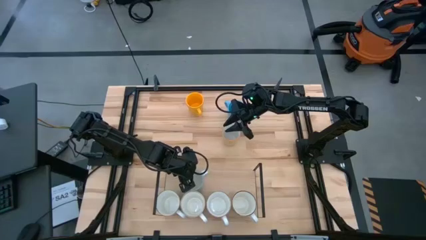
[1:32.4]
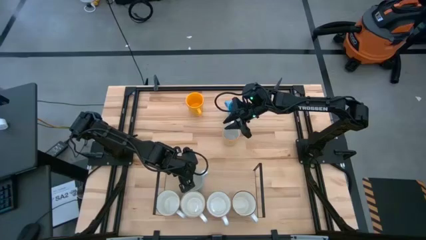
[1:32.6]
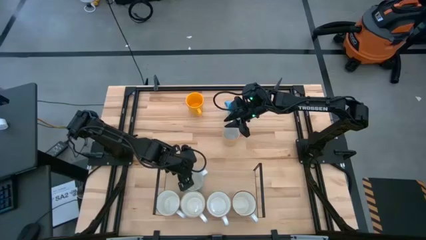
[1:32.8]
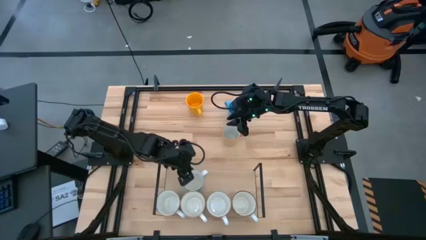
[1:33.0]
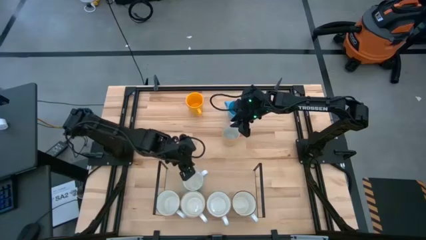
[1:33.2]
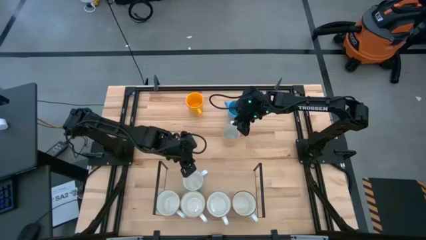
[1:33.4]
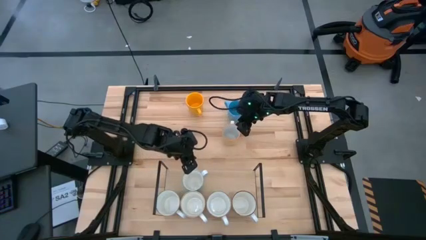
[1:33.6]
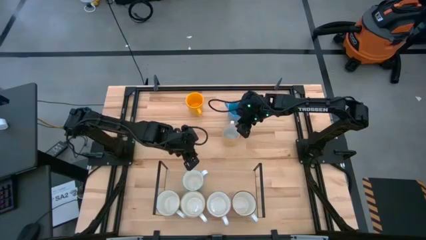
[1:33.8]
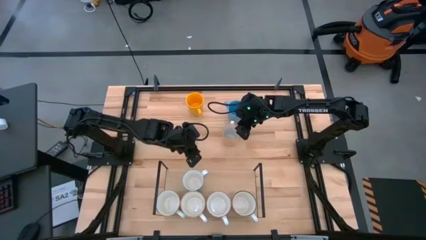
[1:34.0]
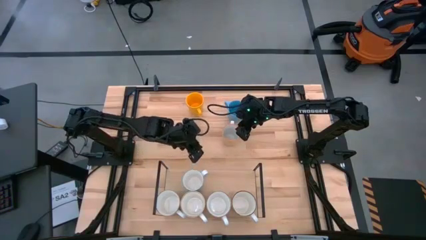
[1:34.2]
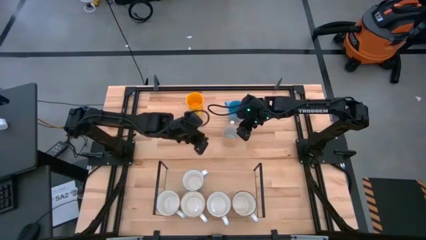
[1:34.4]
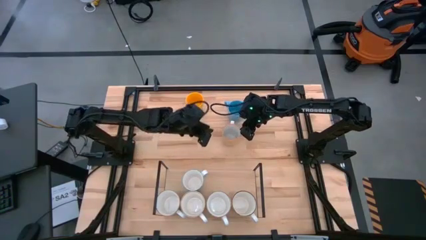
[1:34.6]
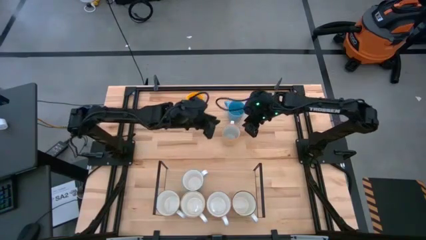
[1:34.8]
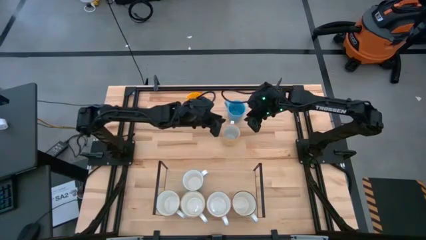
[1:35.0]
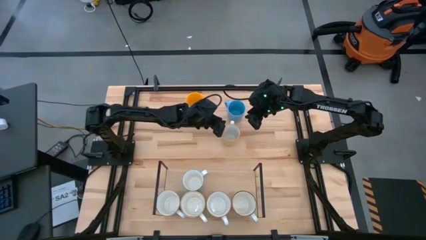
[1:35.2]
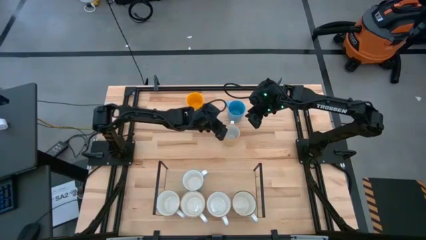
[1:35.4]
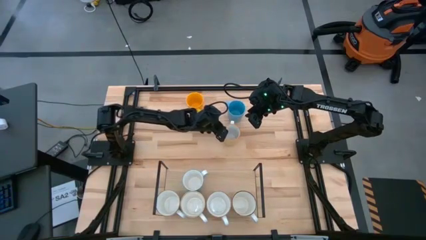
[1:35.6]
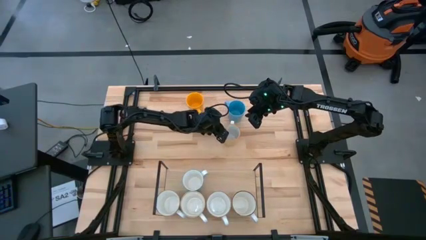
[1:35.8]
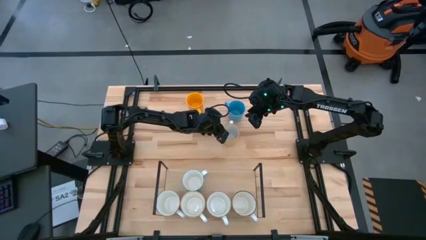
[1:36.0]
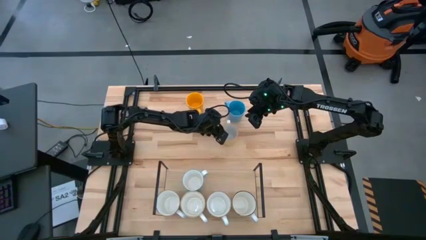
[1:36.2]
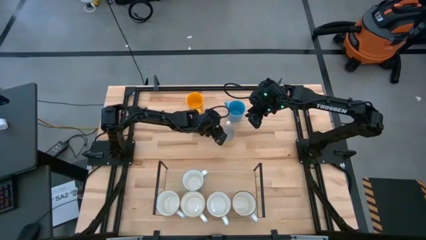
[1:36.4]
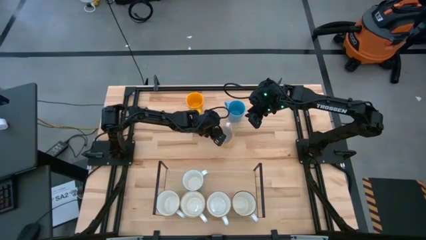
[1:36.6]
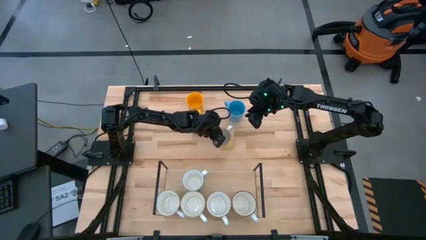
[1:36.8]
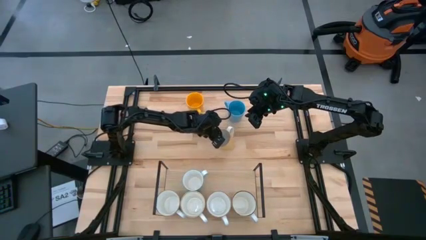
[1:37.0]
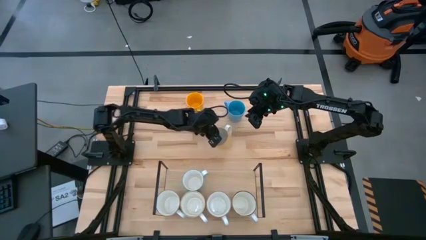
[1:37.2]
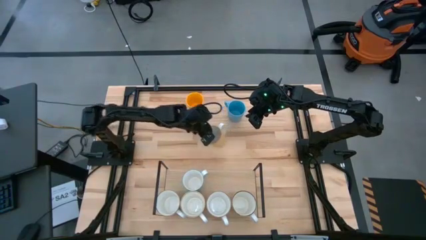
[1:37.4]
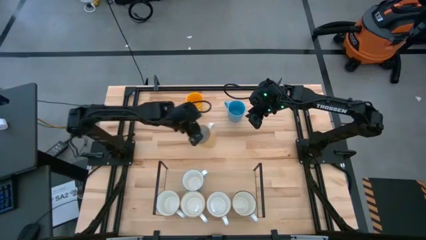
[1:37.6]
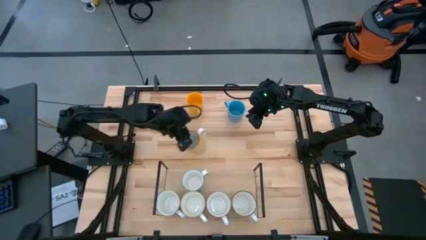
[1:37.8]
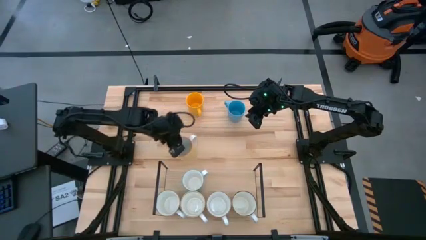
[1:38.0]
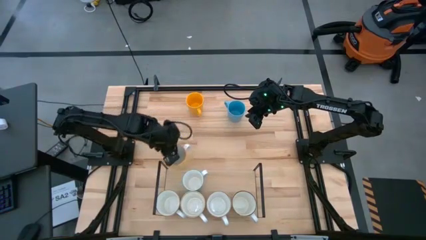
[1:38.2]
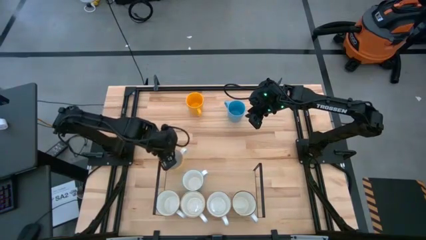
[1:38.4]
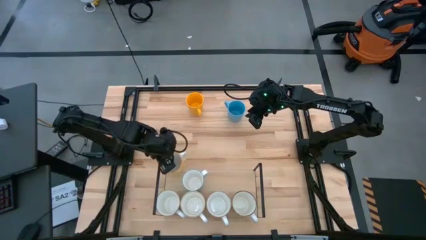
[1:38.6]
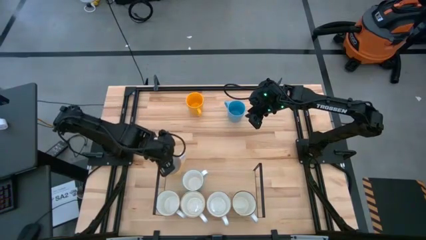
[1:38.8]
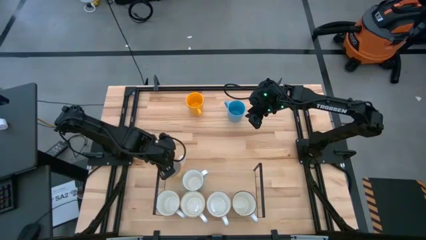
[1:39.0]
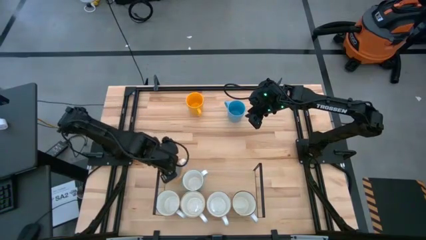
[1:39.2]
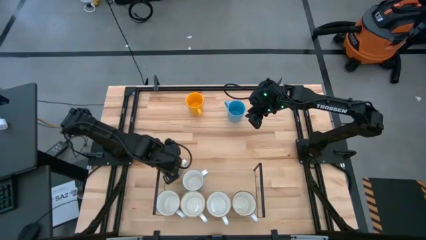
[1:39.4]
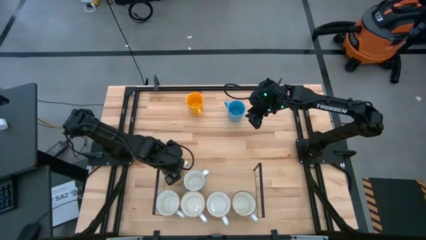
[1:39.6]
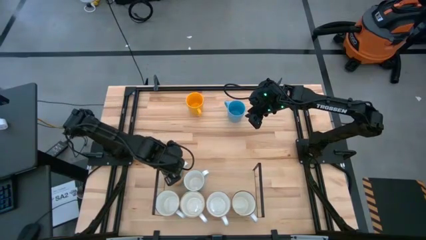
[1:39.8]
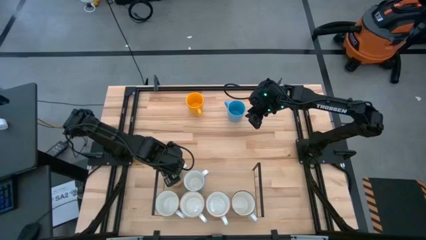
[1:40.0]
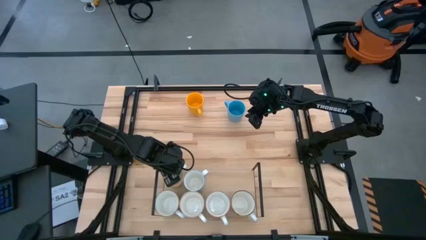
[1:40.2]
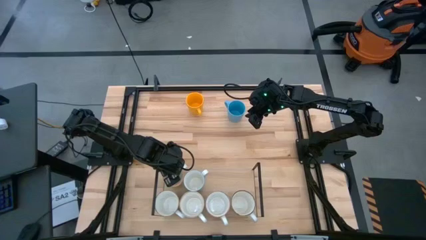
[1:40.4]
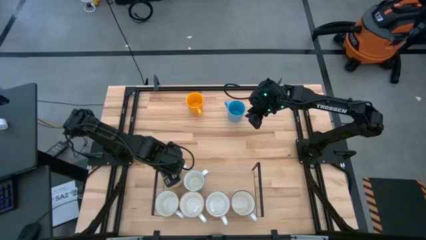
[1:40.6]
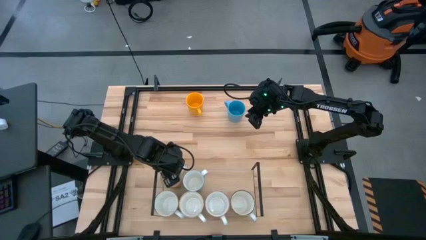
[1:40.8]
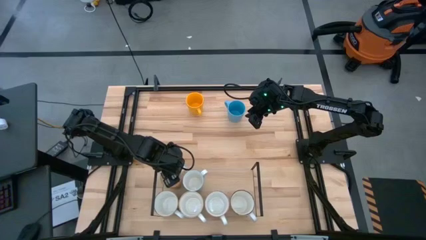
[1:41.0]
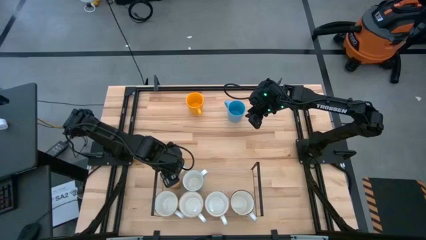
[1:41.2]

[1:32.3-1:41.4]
Task: Place coffee mugs
Put the yellow patterned mug on the shelf

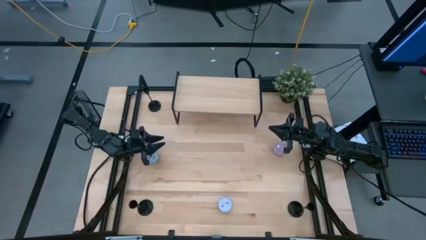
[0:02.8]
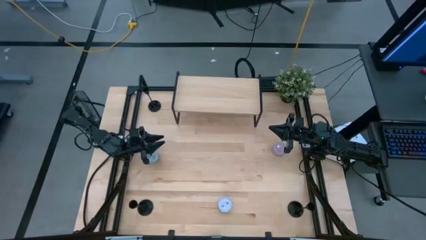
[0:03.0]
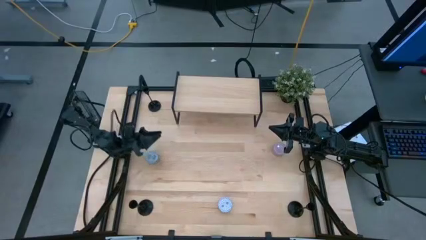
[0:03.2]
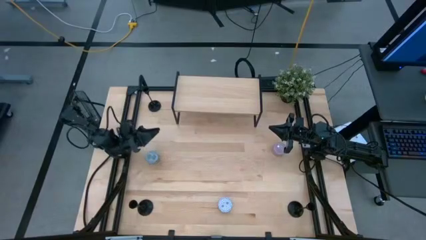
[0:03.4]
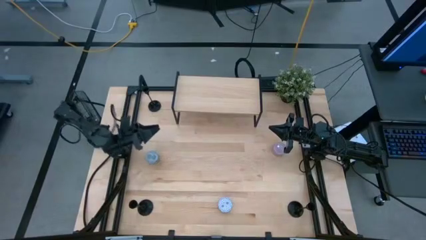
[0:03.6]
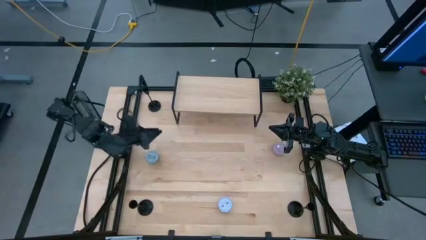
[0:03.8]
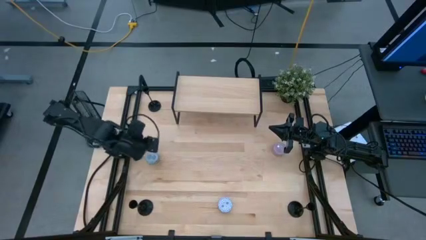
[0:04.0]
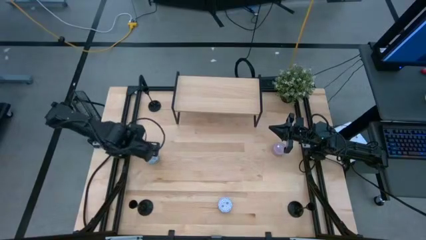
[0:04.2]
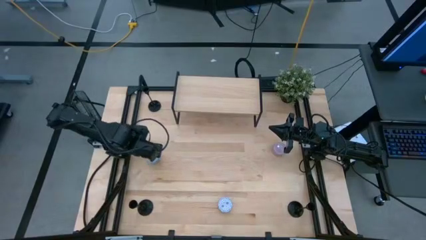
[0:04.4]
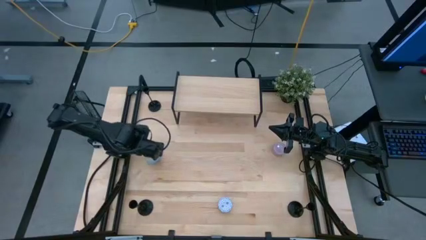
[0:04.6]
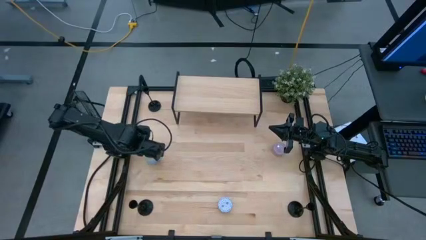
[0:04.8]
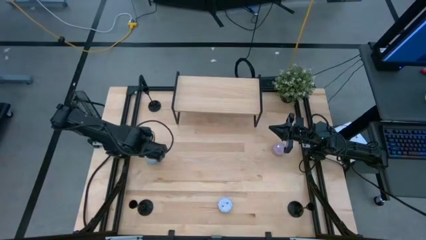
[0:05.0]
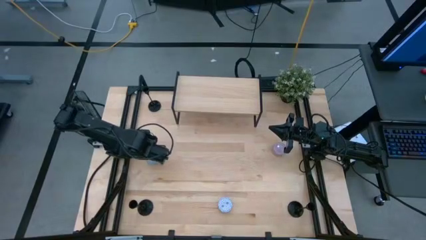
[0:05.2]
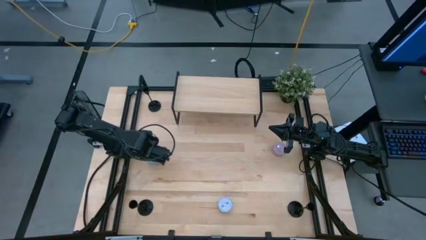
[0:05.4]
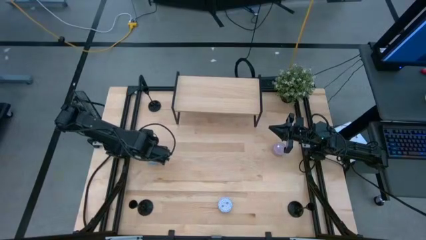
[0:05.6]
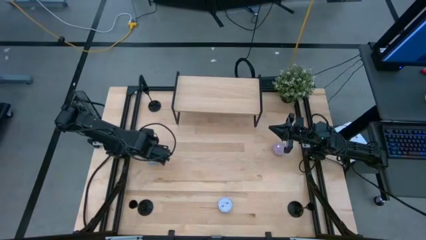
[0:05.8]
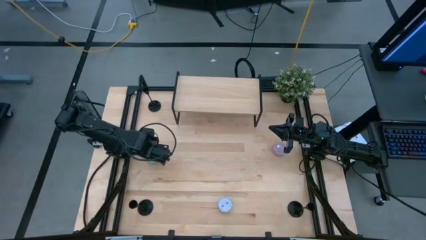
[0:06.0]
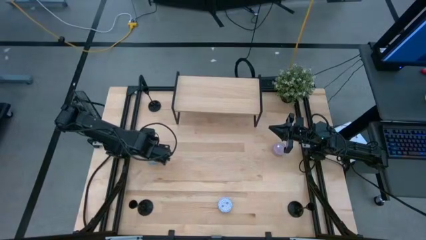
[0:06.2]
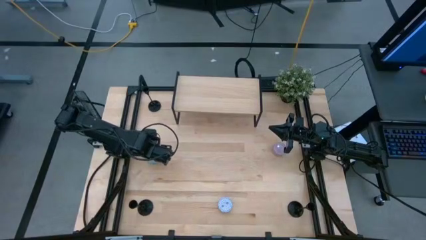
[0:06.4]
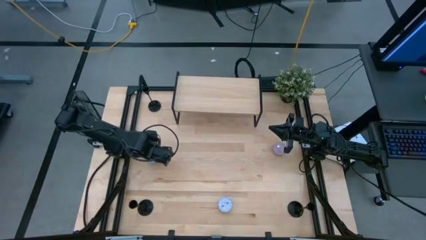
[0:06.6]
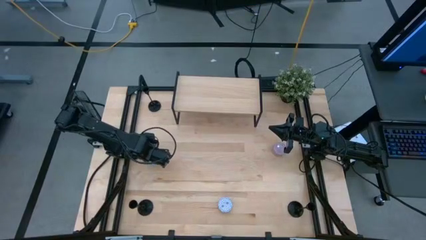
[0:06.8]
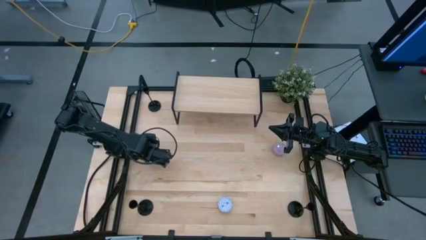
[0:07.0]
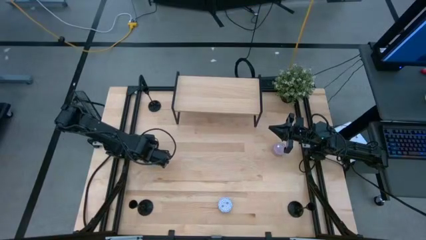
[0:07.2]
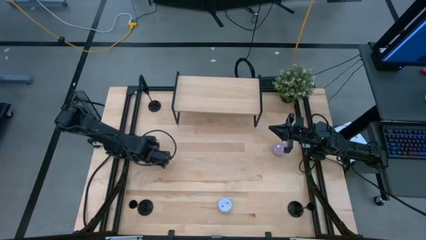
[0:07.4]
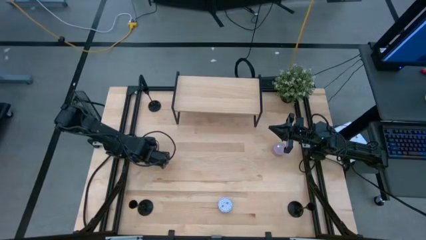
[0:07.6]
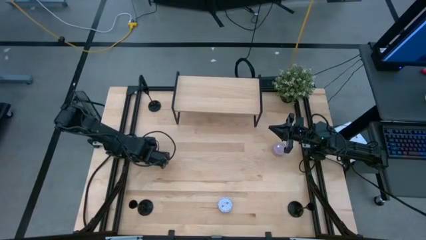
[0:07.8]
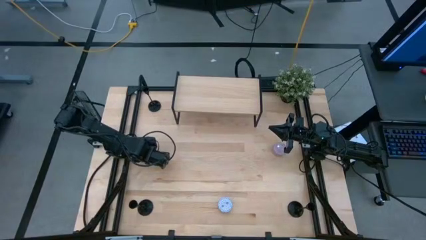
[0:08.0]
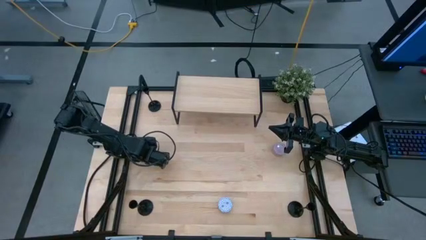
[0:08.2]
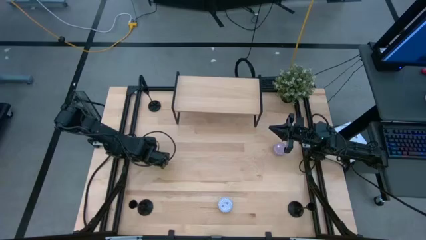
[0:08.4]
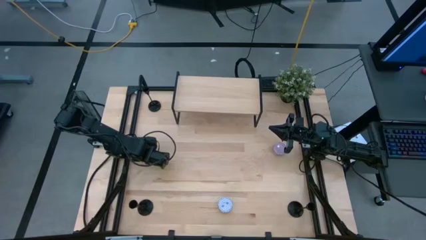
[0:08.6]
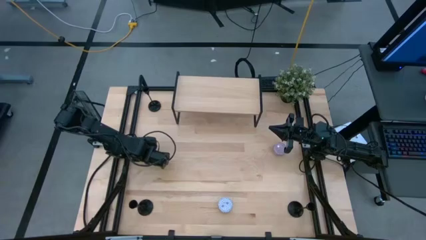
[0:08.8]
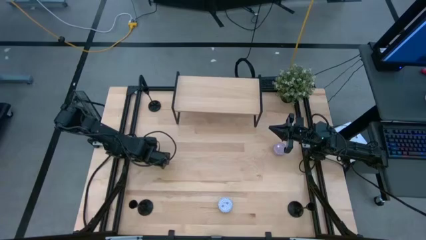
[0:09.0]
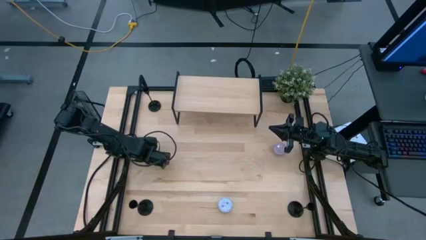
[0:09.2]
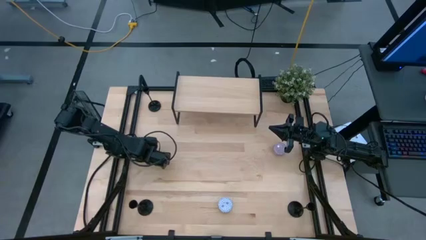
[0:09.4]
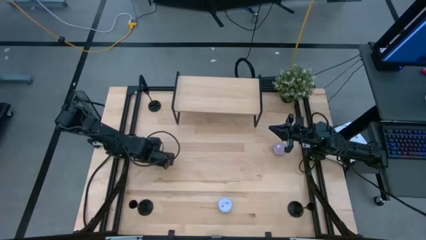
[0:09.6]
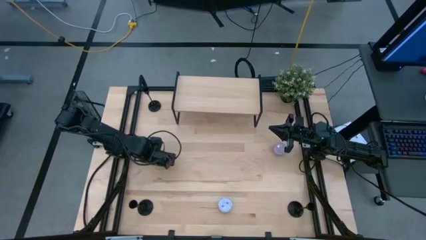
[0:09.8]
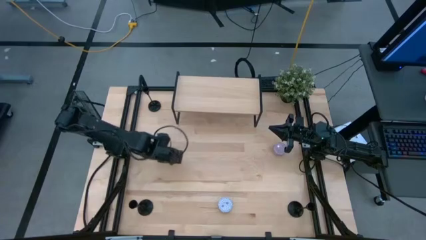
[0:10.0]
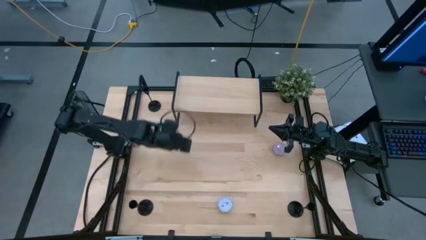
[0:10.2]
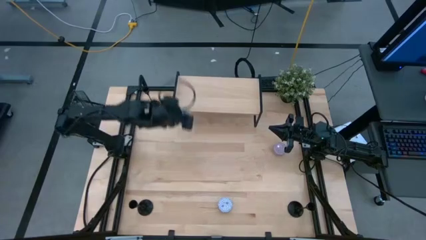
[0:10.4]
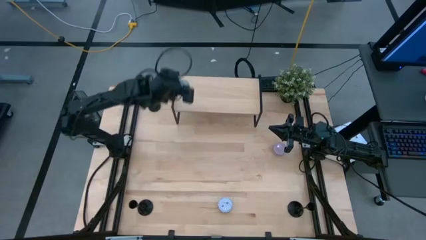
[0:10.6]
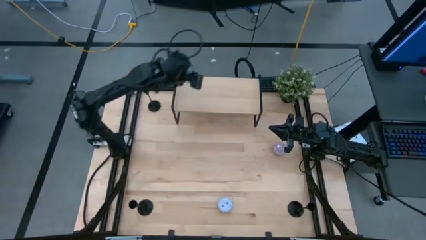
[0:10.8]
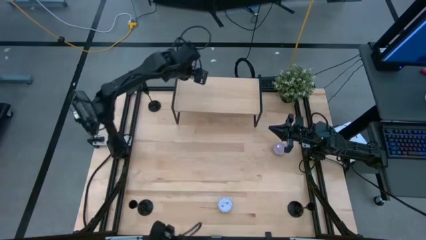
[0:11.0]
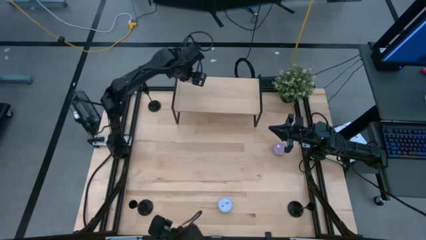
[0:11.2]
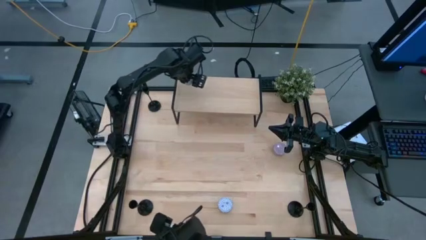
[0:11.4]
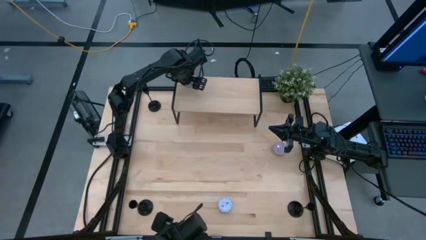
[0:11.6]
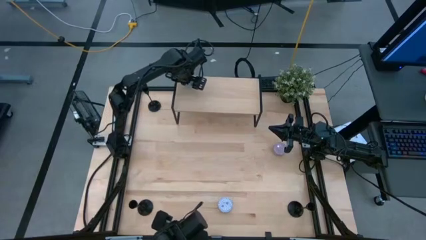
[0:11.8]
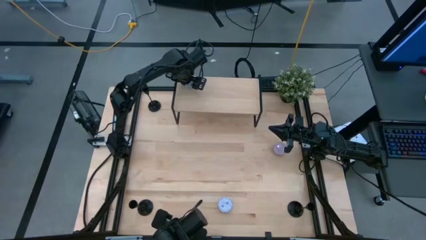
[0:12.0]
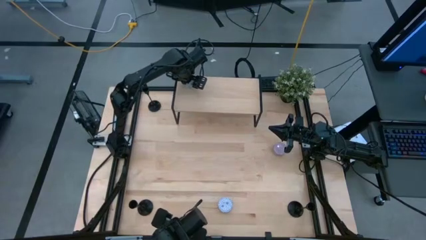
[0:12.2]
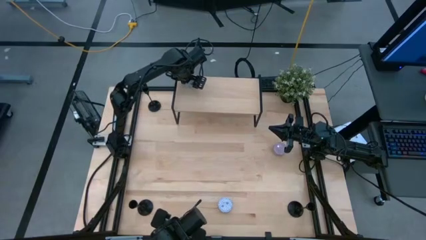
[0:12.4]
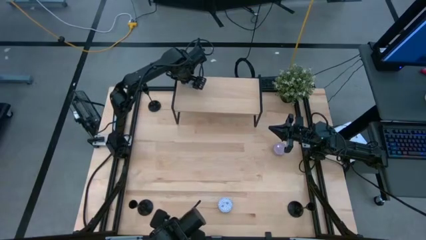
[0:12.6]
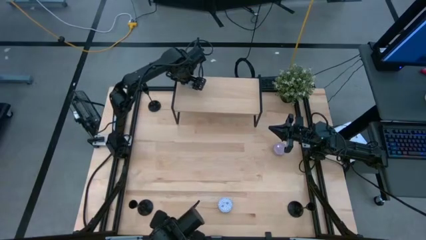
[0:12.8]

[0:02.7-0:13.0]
Task: Pick & Place candle stick holders
Put the left blue scented candle on the shelf
